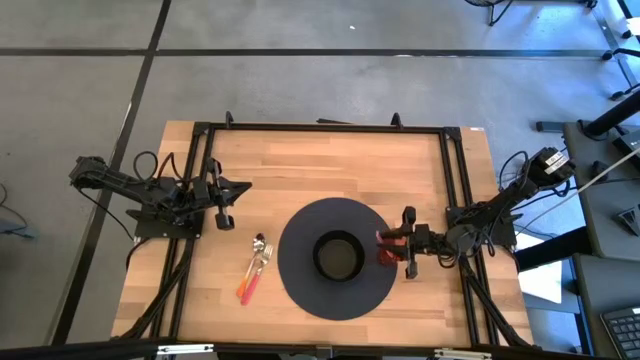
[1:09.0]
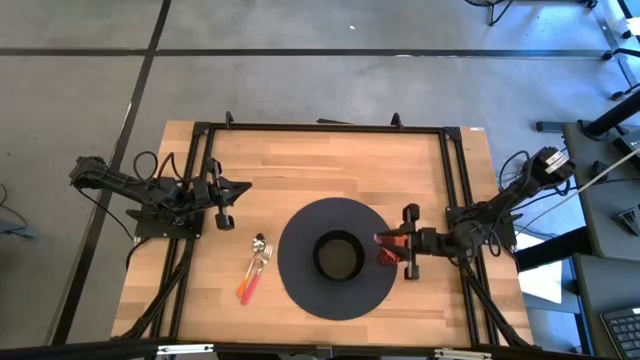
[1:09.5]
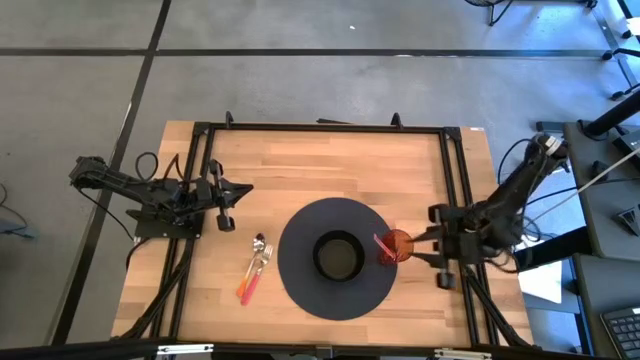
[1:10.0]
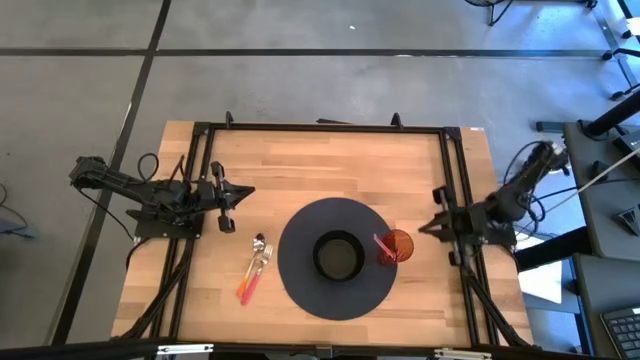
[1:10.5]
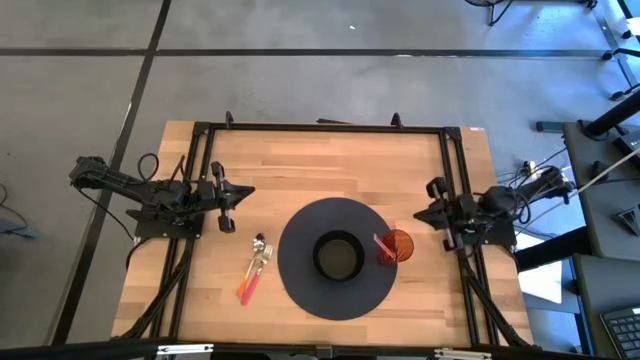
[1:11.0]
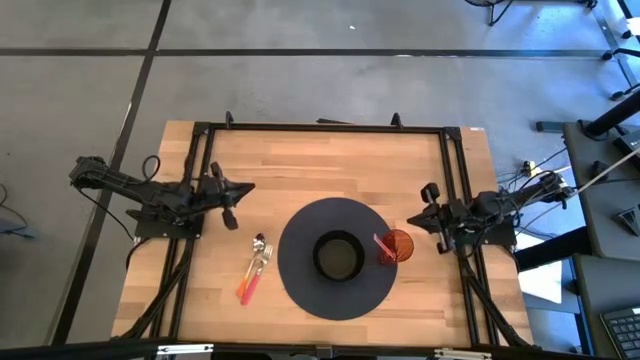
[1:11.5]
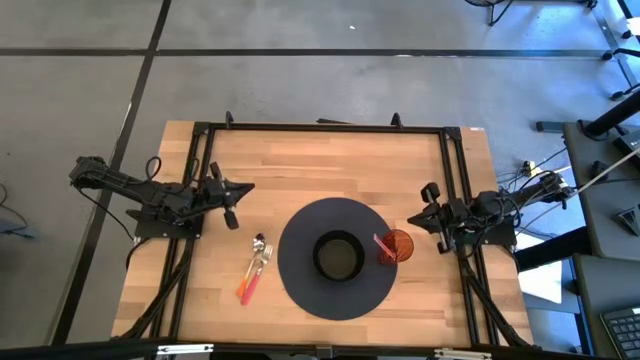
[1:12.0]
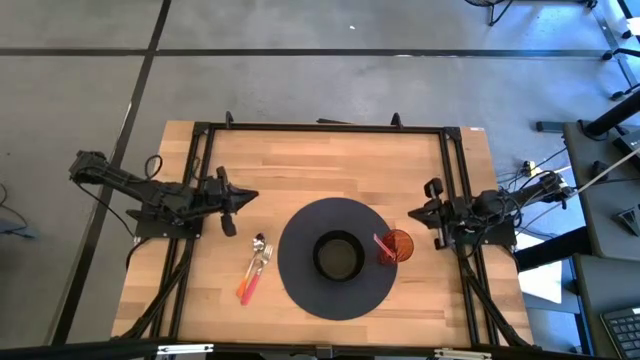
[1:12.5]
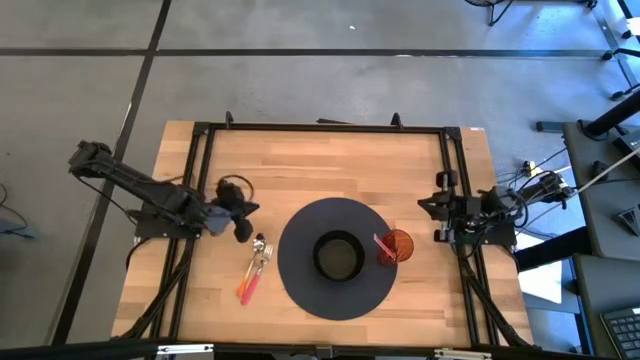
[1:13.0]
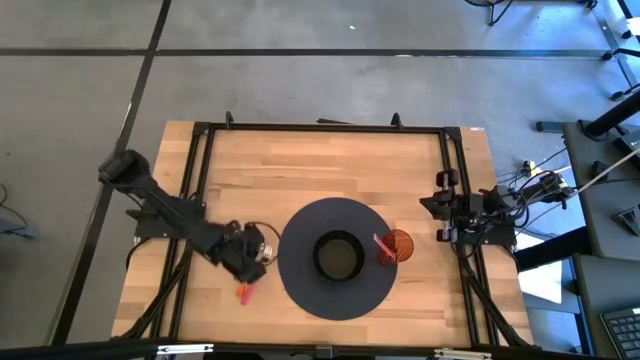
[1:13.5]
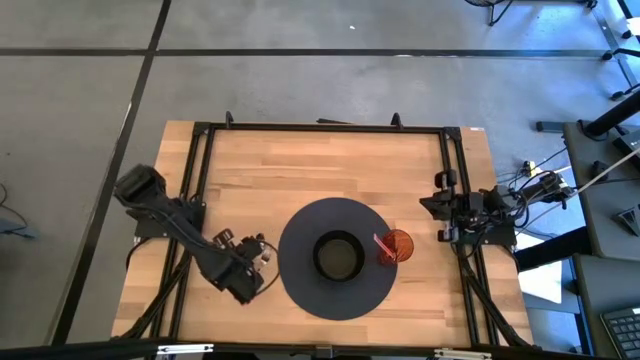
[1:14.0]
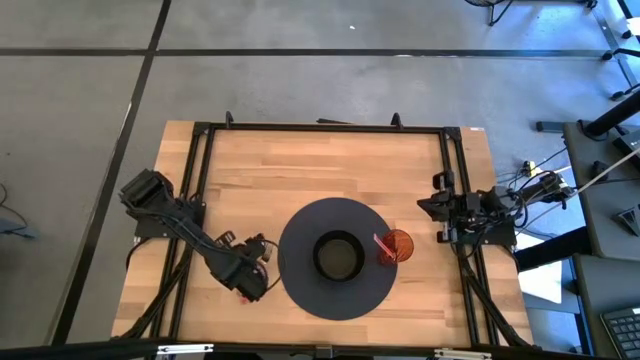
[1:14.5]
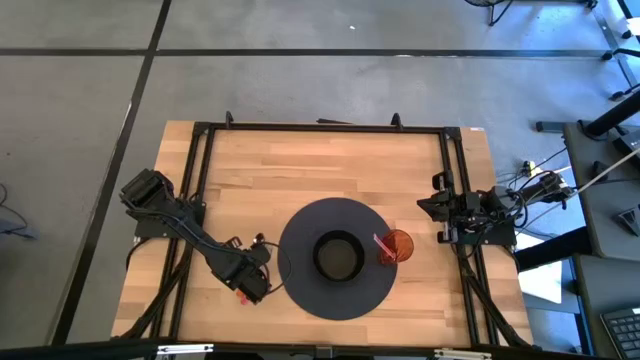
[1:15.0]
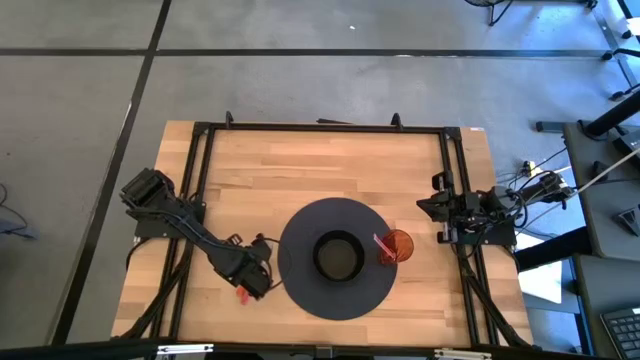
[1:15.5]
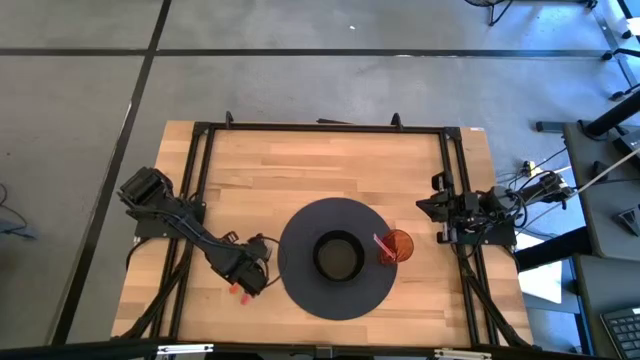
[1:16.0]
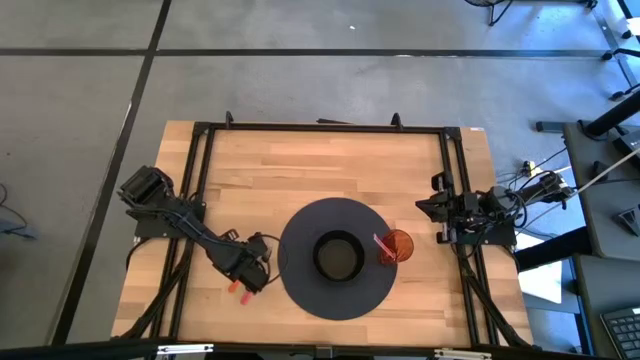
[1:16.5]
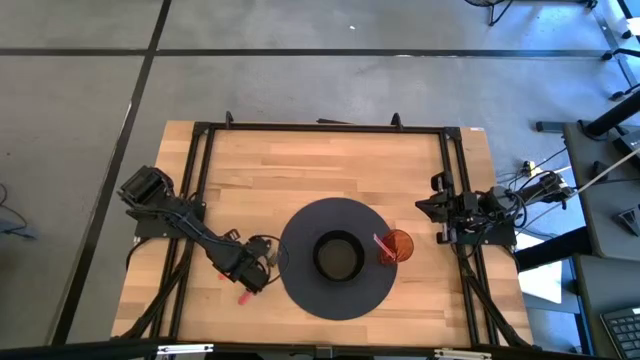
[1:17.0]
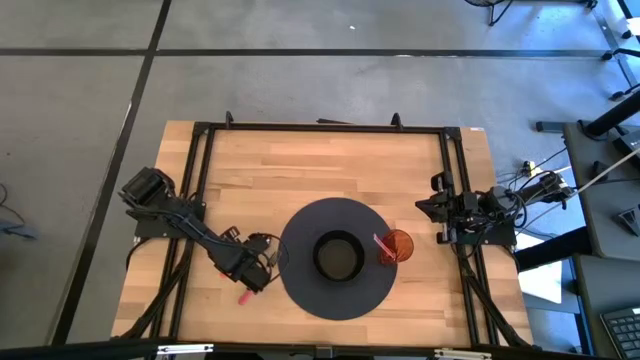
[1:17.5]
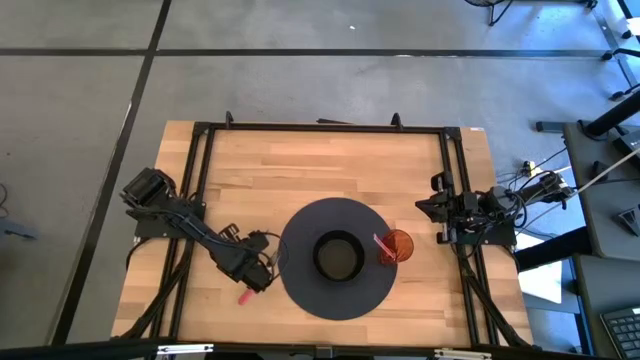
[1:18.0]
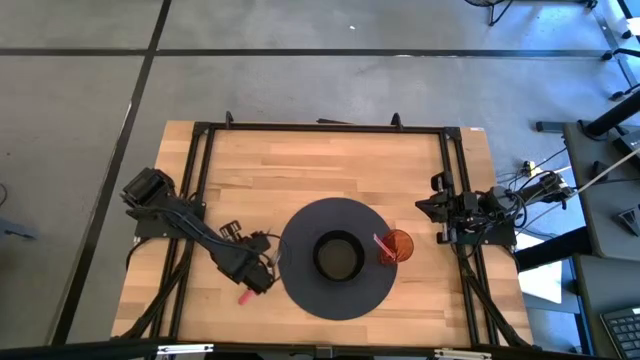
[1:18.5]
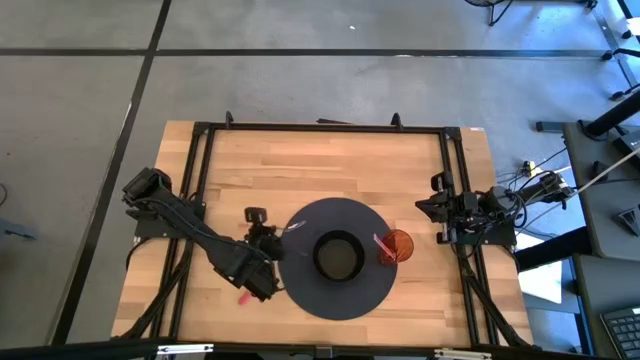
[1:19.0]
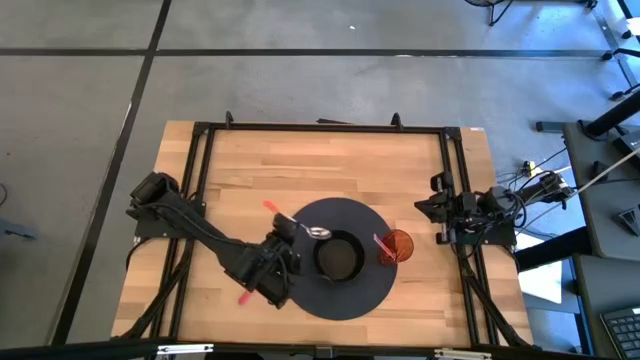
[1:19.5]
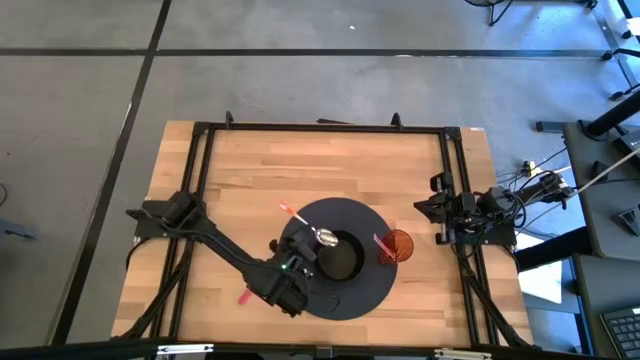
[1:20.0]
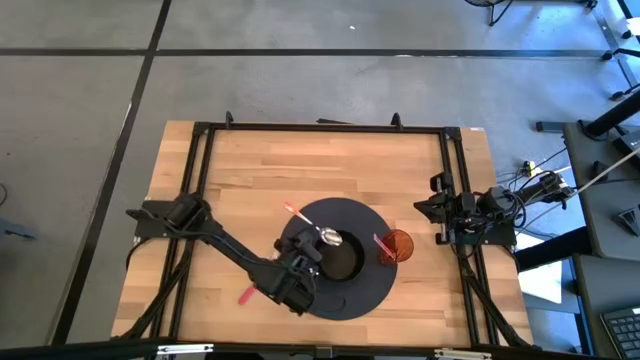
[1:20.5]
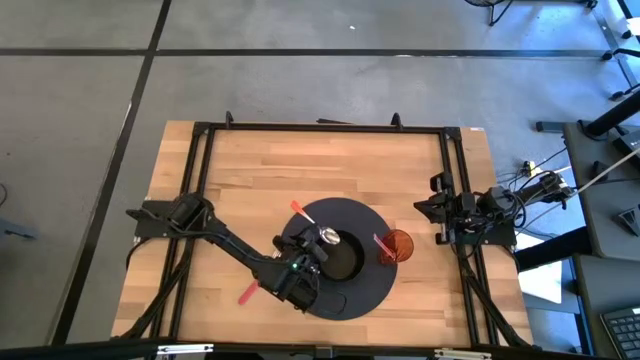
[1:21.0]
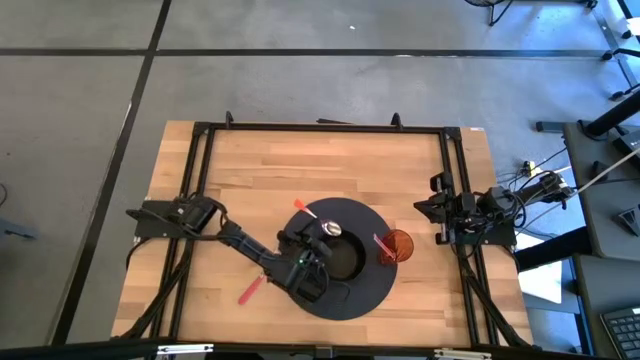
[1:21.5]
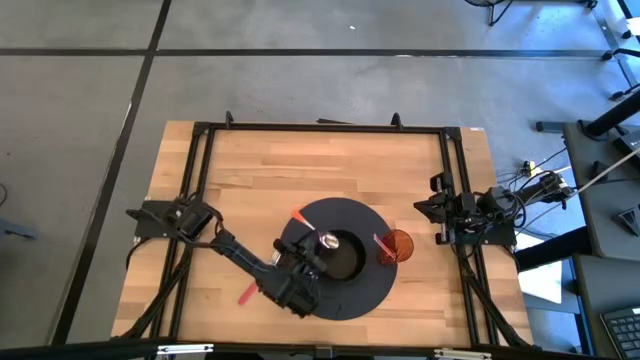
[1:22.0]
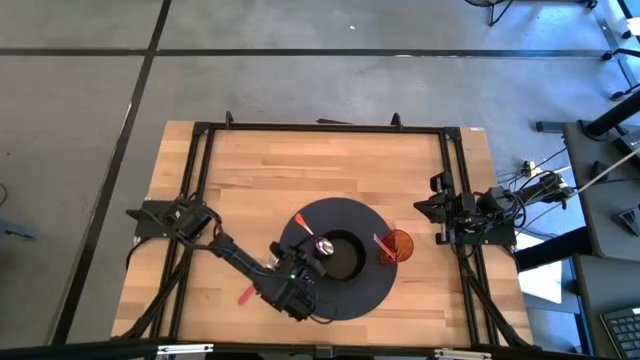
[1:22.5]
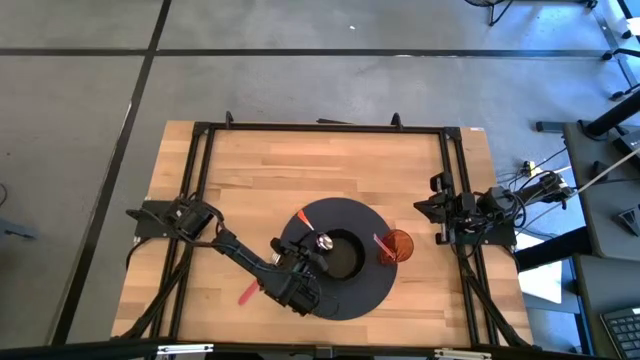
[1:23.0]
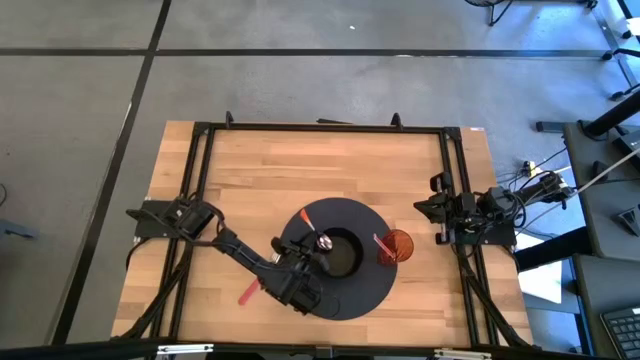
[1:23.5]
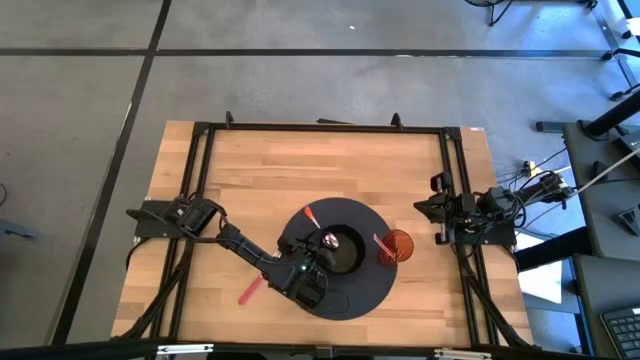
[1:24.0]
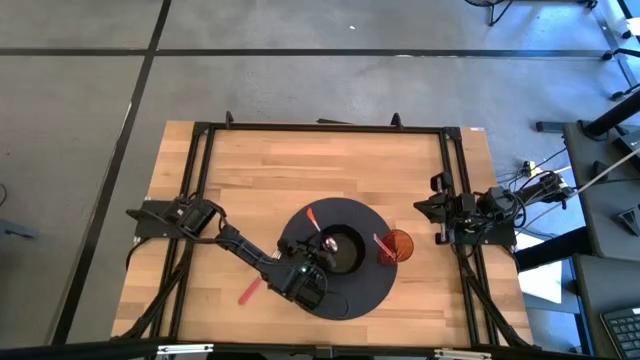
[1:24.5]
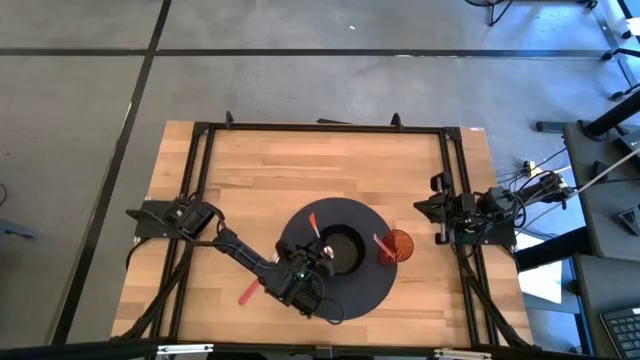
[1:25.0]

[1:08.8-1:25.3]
Task: Pick & Place Utensil
Put the orange spoon into the black bowl on the mat
